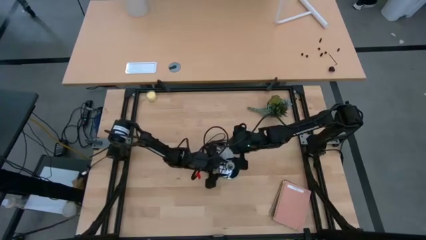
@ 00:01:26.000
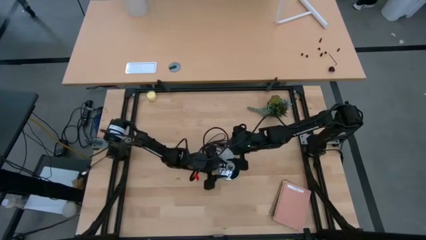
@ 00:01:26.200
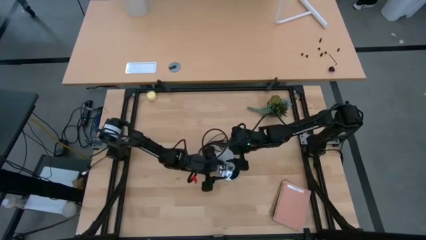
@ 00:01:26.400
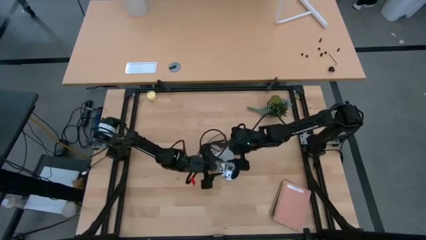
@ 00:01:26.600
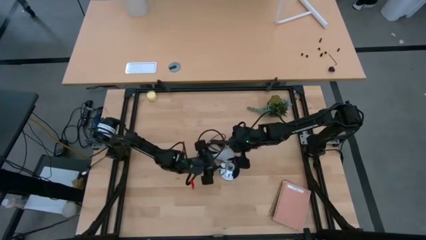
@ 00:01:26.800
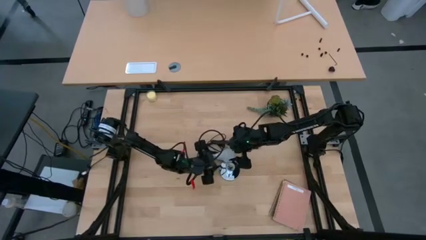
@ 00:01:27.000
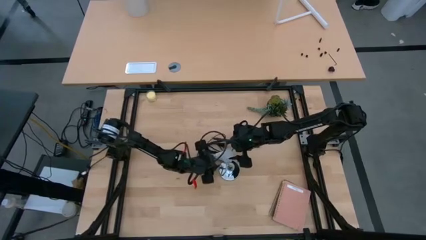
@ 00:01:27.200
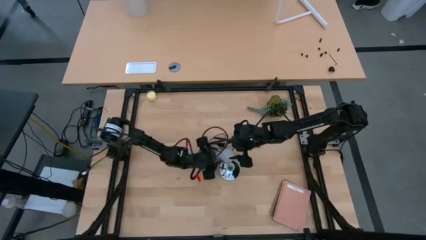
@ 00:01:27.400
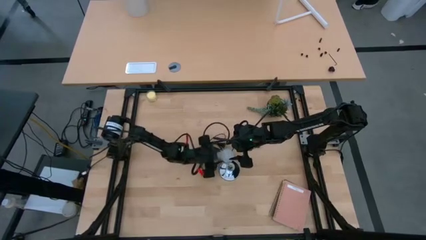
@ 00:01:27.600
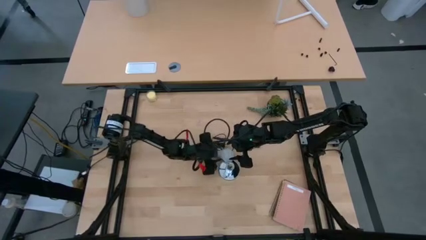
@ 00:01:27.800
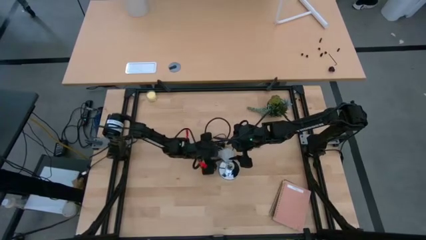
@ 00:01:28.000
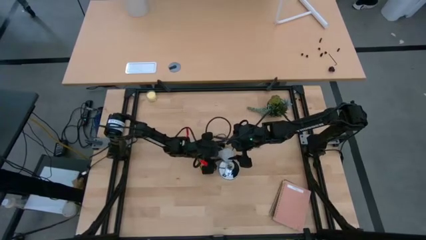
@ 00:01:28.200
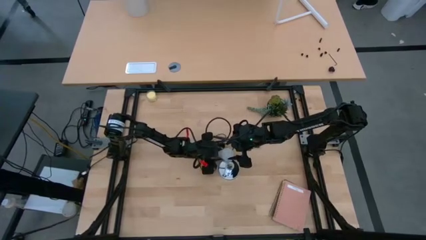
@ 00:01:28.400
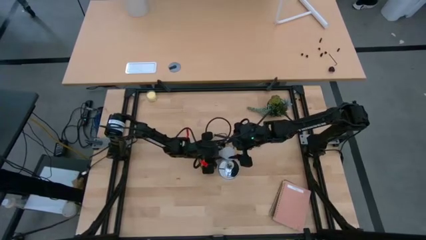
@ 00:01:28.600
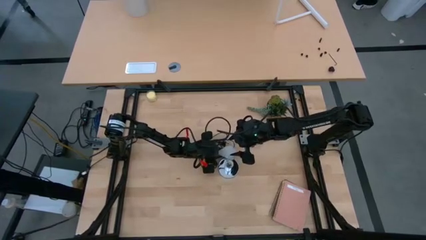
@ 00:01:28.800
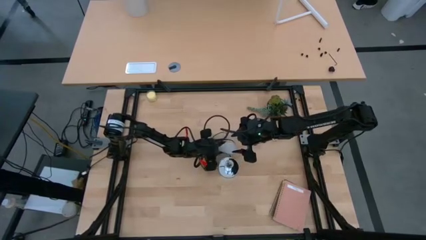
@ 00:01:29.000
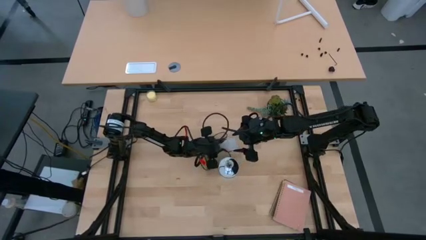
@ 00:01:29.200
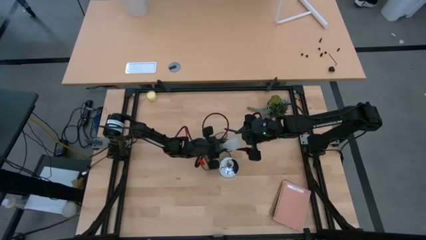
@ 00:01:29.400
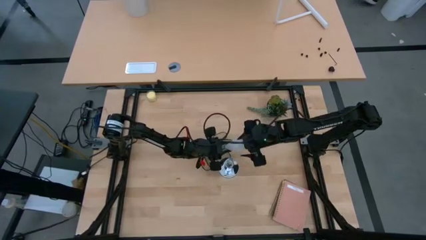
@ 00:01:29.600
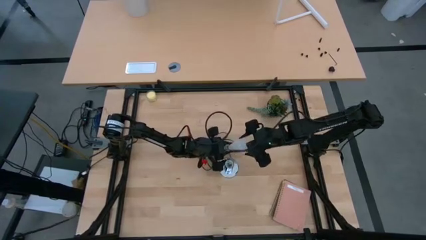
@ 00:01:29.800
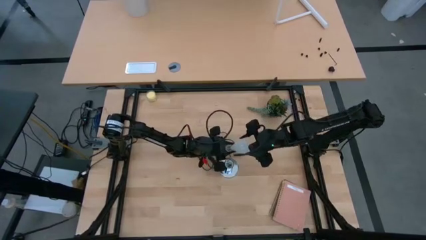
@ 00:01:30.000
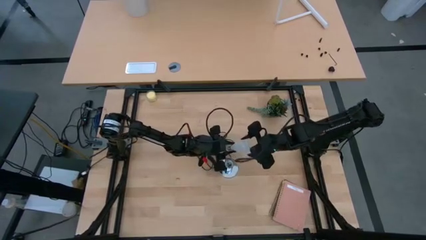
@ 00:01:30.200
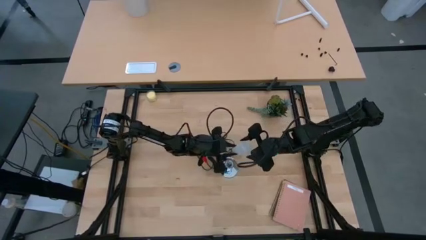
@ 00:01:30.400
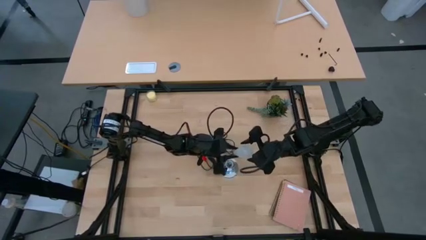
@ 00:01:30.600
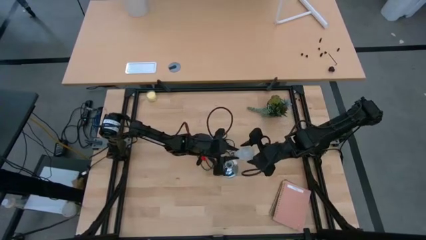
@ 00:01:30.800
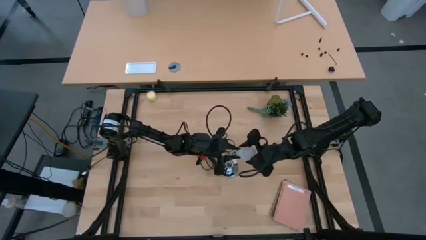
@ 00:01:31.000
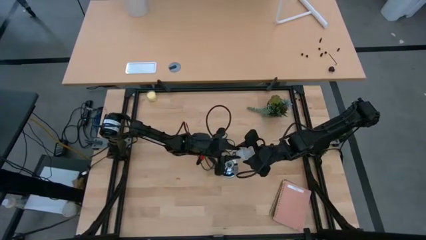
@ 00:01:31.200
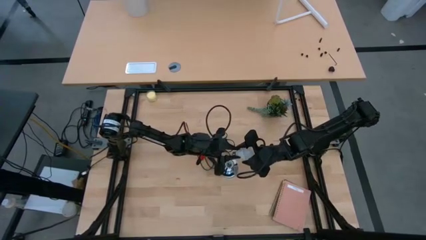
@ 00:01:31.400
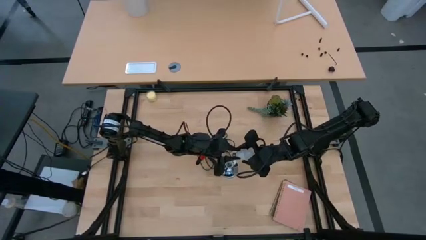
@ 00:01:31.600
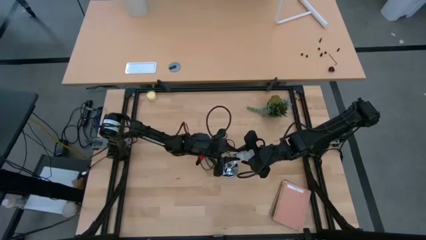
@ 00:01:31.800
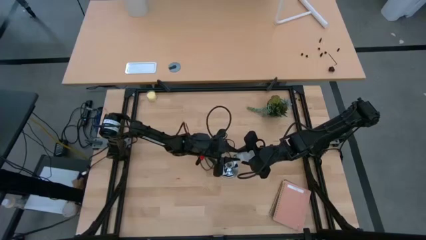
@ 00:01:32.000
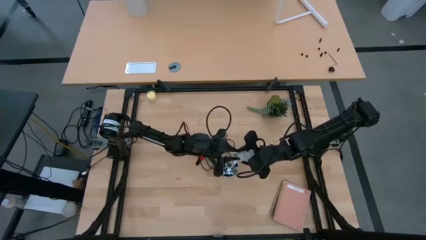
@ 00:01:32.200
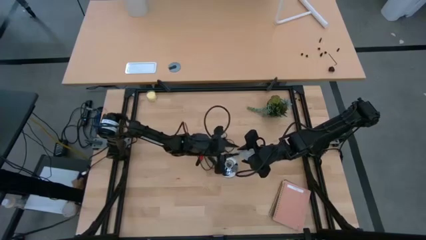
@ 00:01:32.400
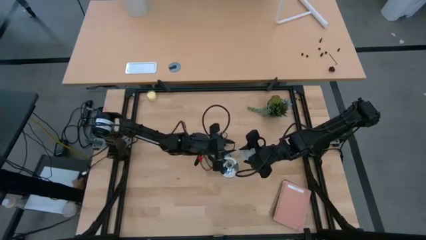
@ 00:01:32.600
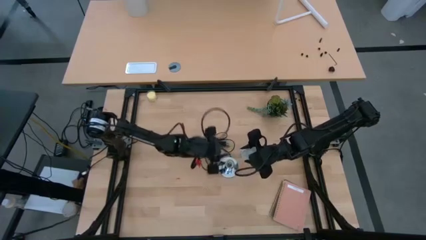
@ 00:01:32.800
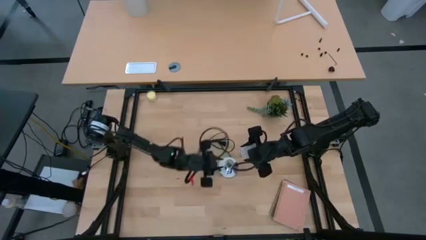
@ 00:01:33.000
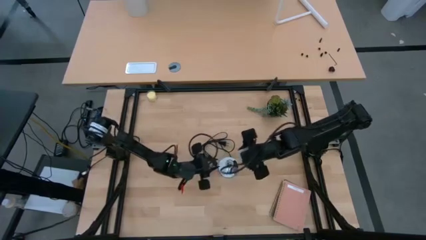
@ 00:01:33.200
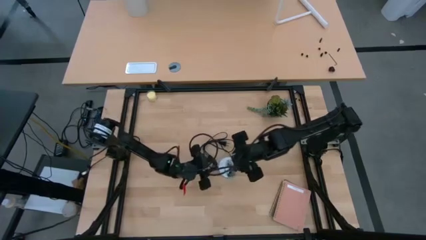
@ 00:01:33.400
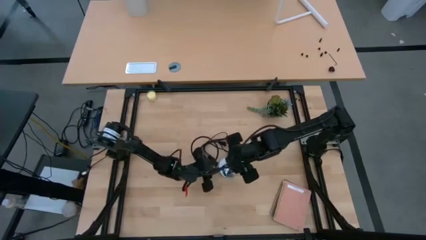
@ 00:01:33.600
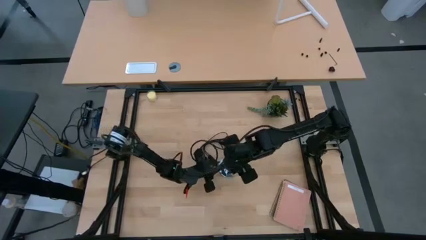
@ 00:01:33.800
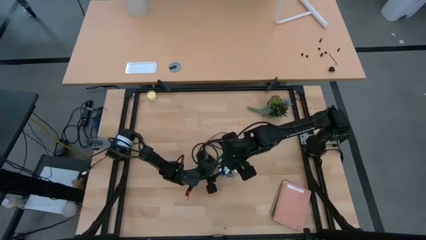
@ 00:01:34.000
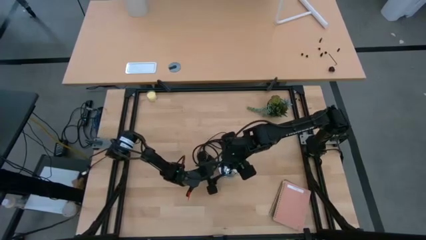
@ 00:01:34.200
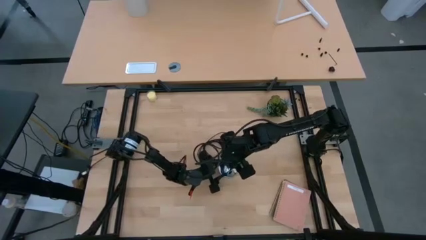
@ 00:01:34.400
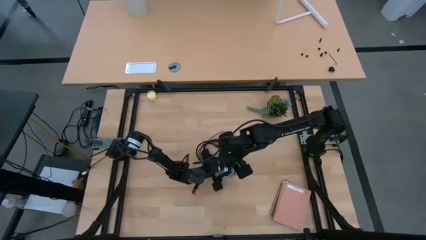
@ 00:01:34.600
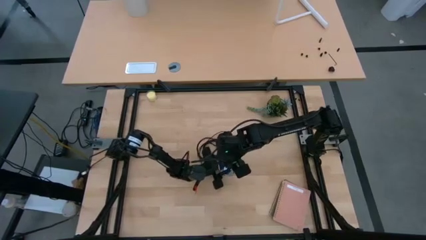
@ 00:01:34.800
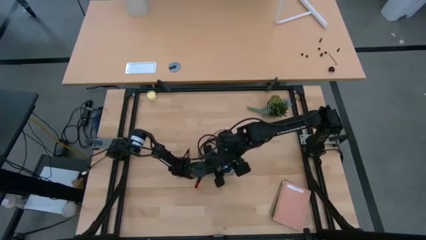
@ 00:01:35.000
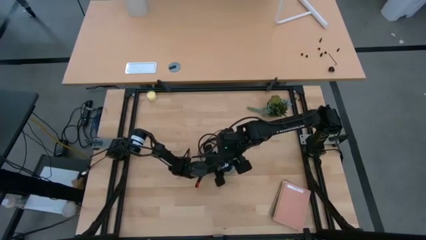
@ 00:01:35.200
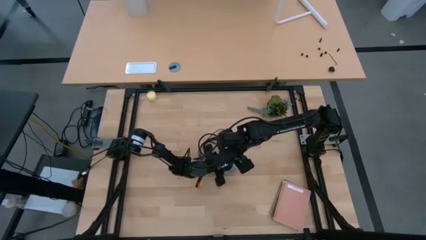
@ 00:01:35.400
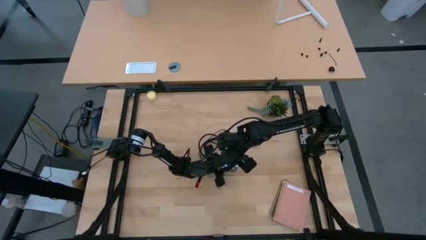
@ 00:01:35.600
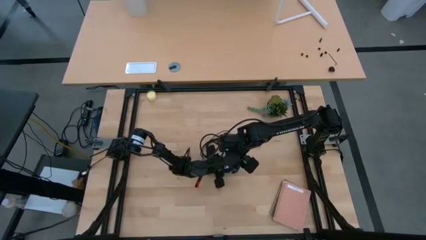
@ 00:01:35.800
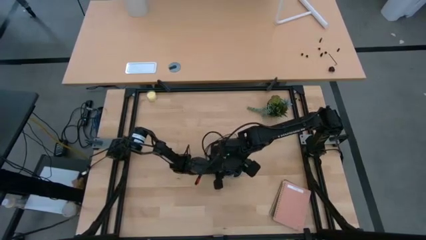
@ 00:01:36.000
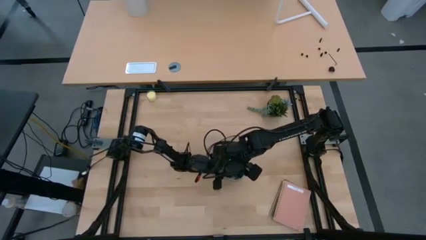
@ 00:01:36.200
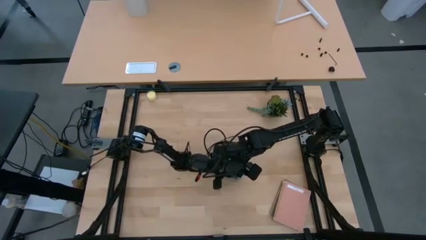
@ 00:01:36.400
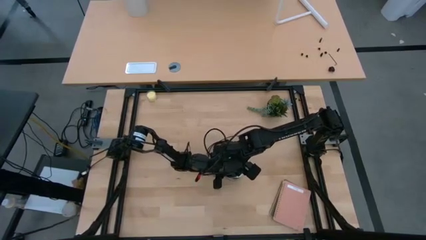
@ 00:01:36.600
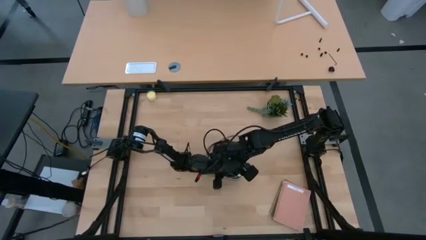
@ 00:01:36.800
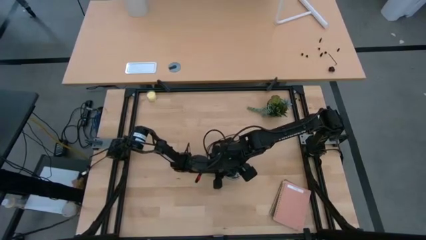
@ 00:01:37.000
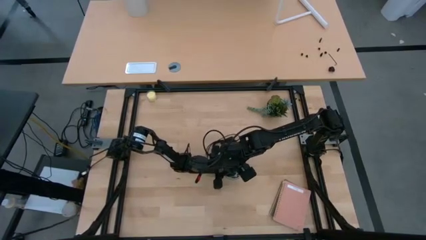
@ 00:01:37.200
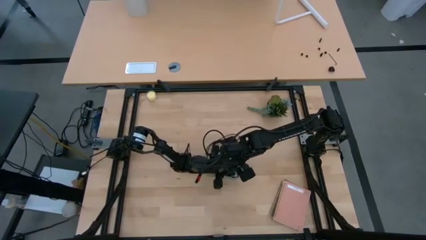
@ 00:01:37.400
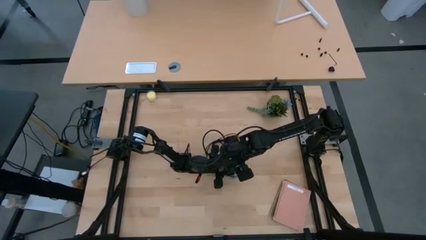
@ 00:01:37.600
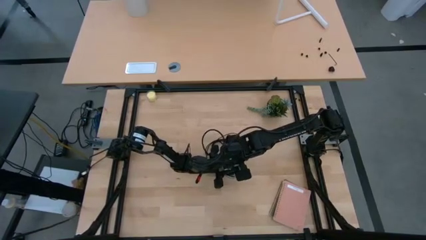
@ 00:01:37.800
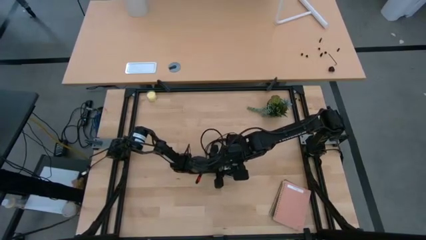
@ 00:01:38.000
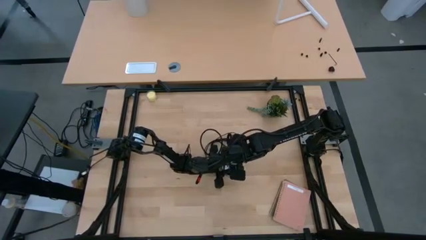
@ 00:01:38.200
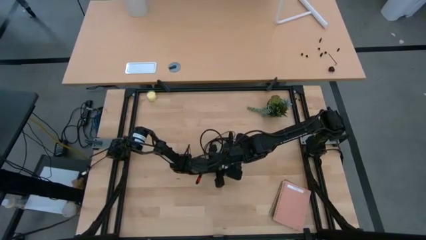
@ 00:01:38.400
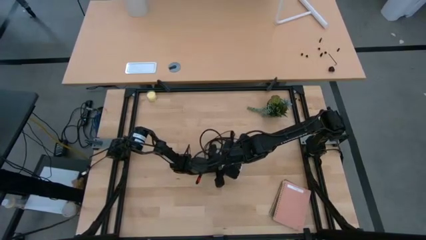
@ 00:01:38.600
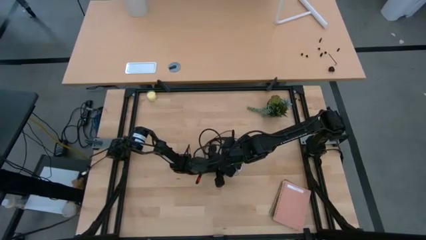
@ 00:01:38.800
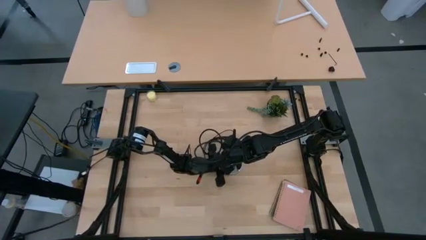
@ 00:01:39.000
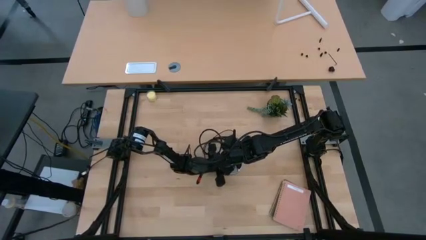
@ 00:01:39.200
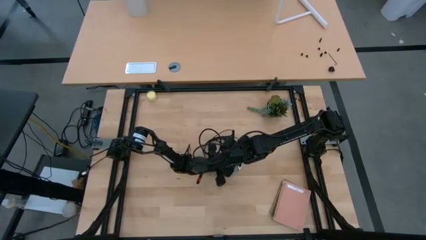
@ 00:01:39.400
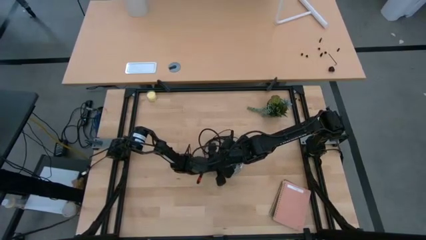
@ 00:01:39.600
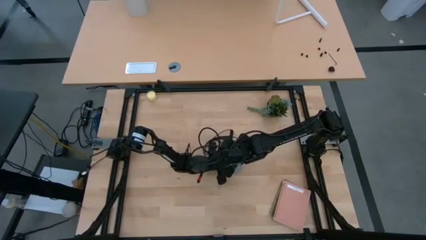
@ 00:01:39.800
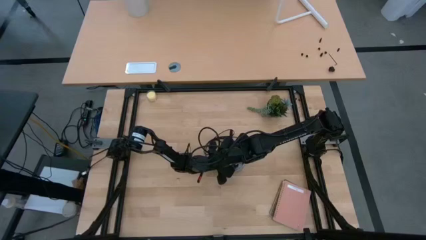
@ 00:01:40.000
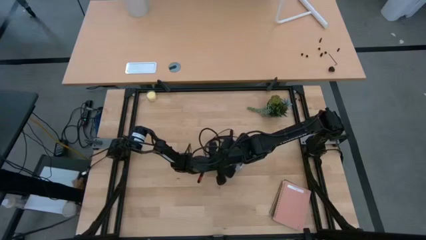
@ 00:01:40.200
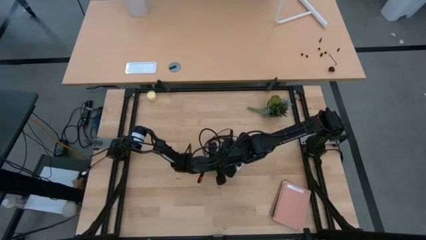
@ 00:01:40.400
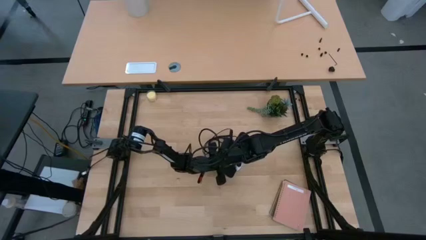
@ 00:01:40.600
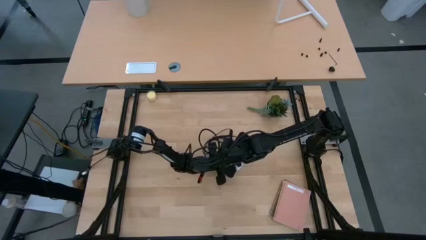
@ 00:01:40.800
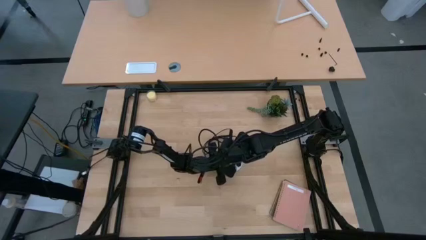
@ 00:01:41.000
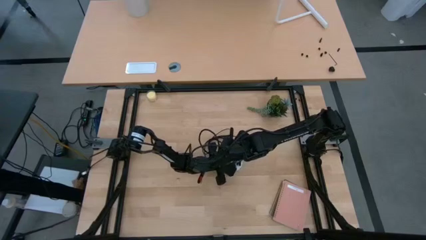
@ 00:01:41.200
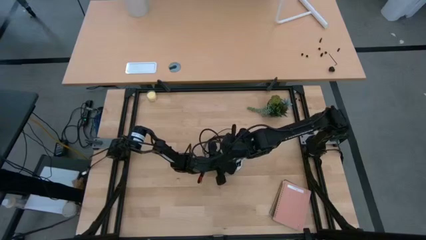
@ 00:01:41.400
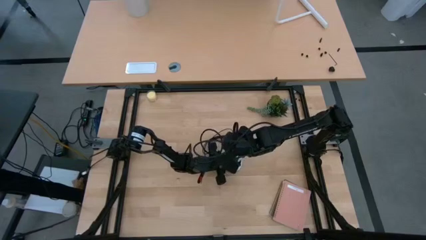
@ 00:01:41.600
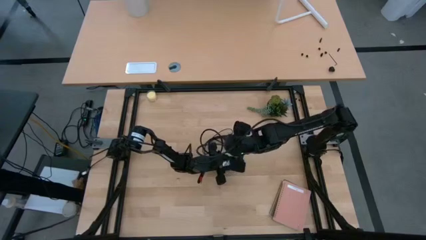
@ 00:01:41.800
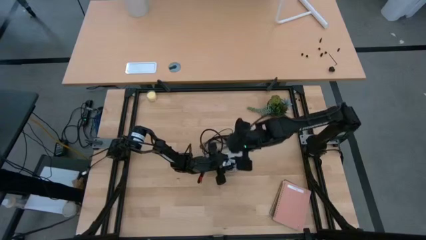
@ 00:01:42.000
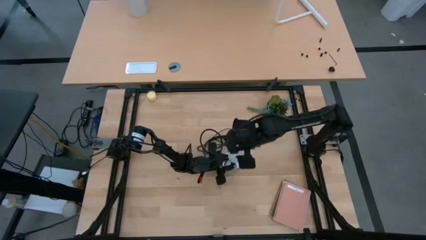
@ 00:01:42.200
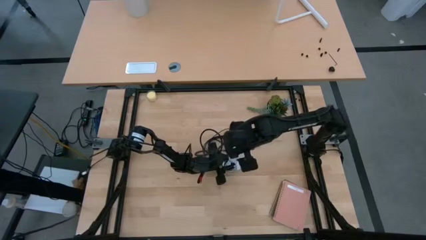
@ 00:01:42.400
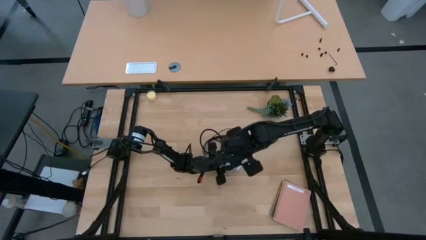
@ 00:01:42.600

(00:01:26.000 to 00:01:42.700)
Task: Screw lightbulb
Insert the white lightbulb into the metallic lamp
